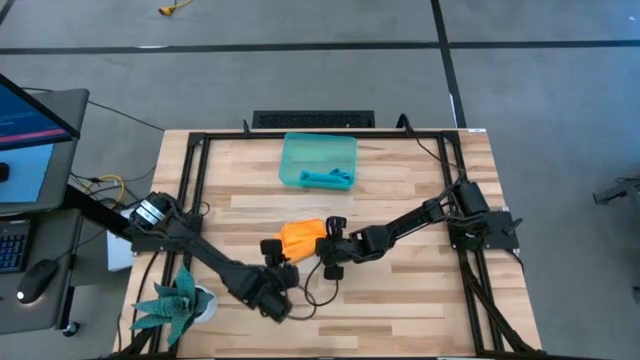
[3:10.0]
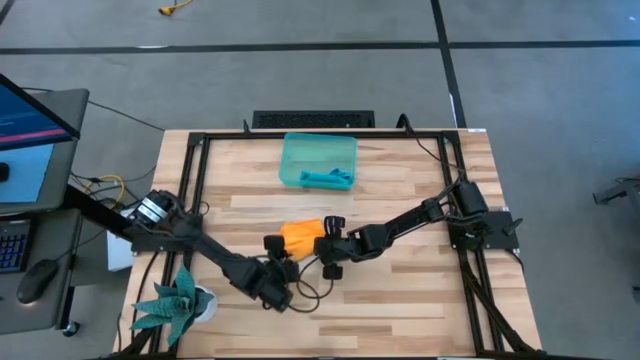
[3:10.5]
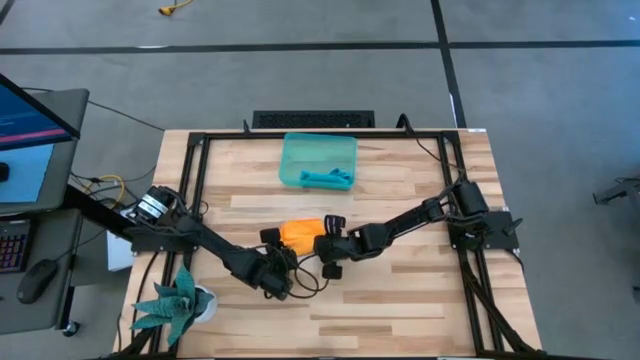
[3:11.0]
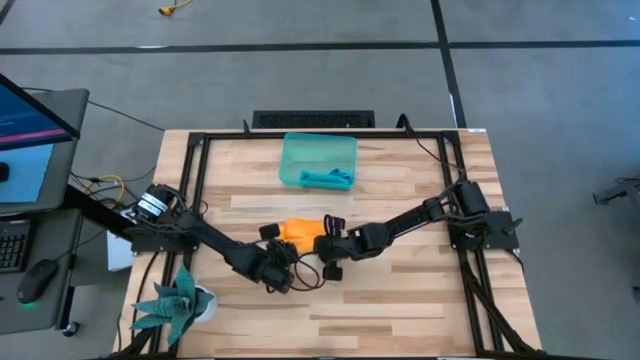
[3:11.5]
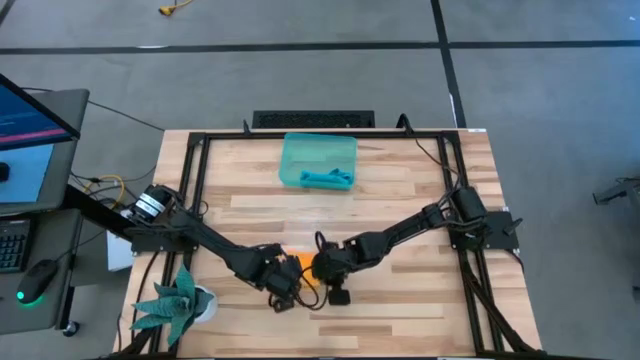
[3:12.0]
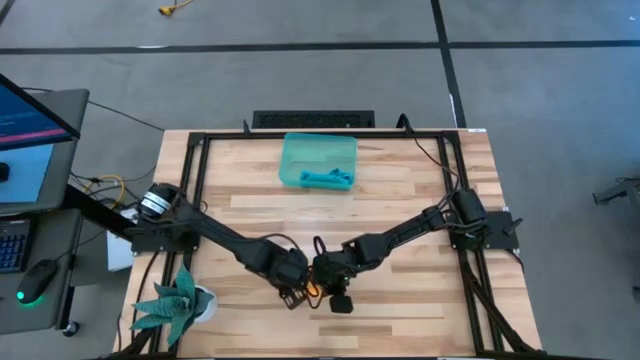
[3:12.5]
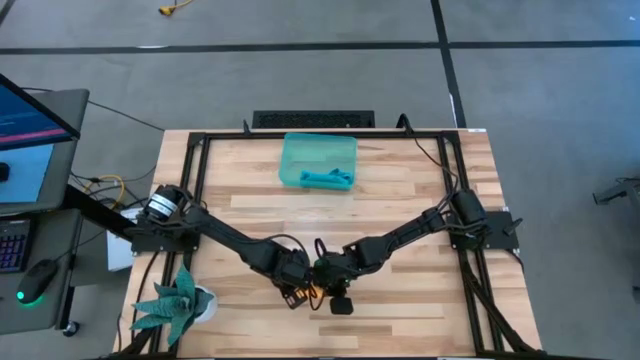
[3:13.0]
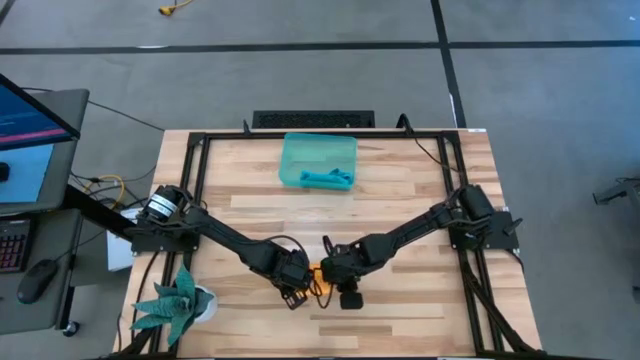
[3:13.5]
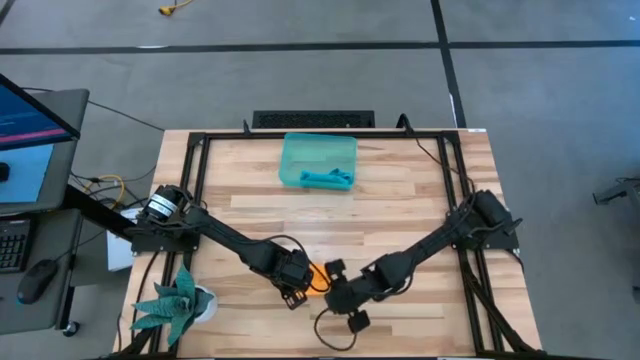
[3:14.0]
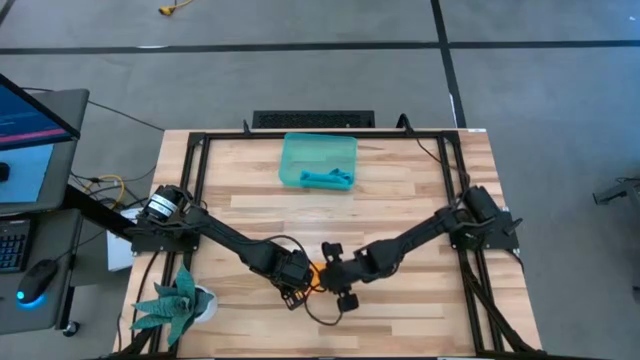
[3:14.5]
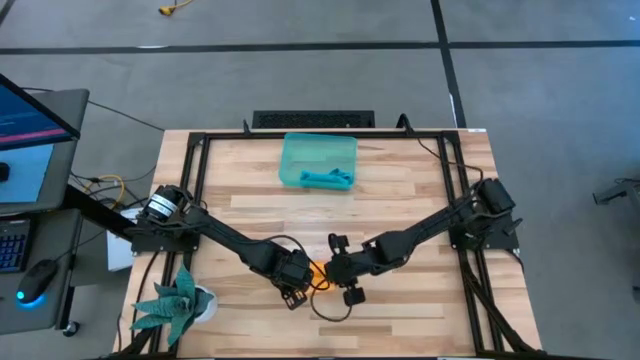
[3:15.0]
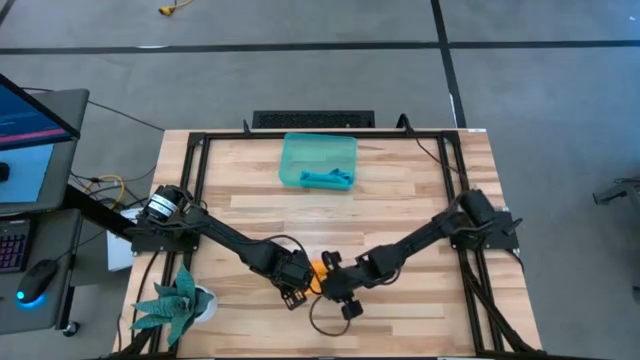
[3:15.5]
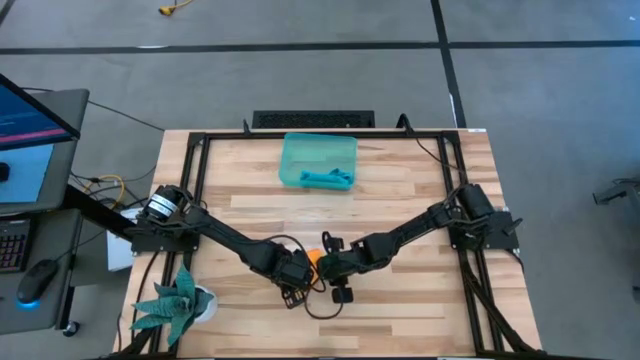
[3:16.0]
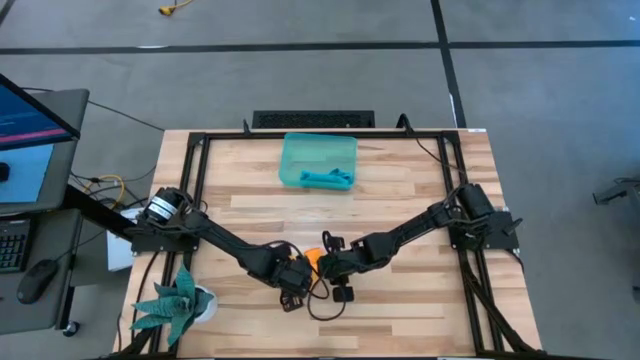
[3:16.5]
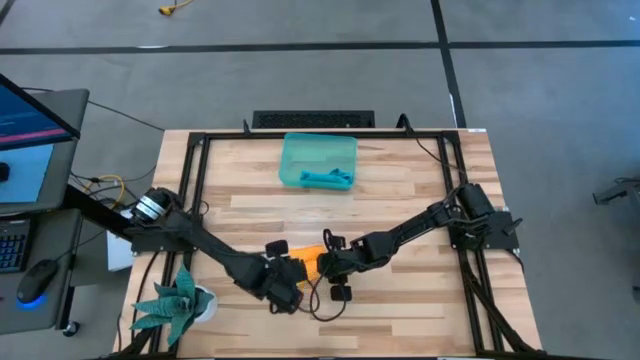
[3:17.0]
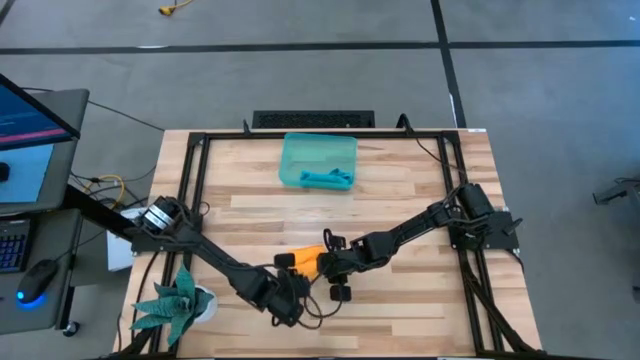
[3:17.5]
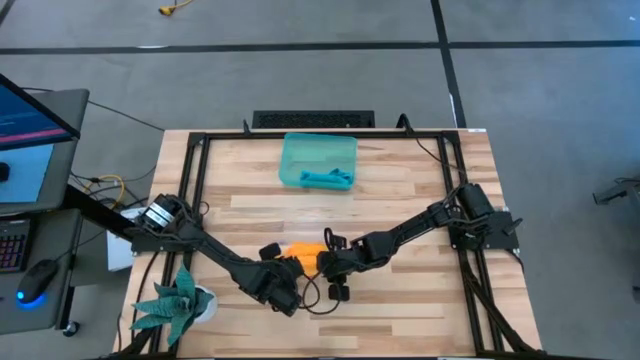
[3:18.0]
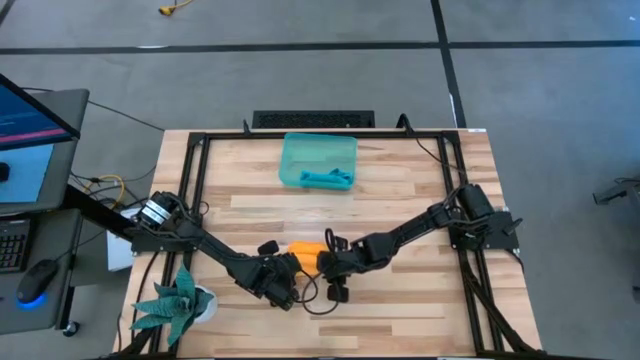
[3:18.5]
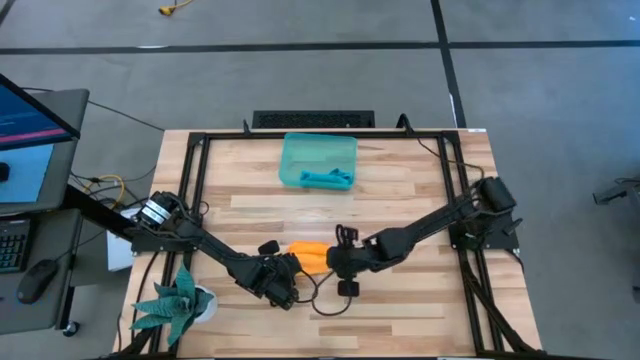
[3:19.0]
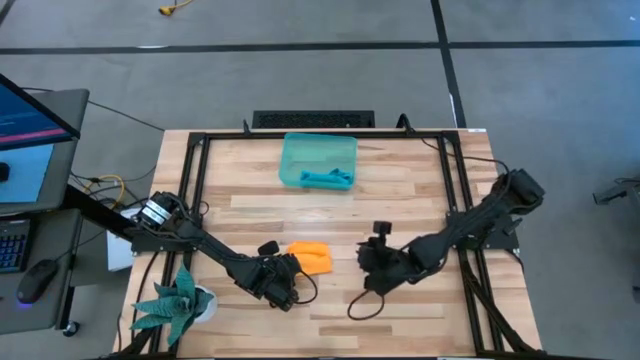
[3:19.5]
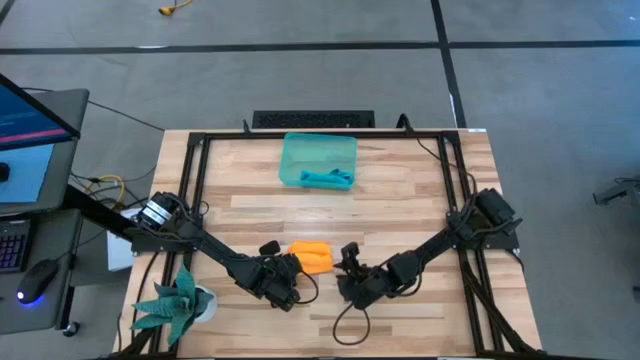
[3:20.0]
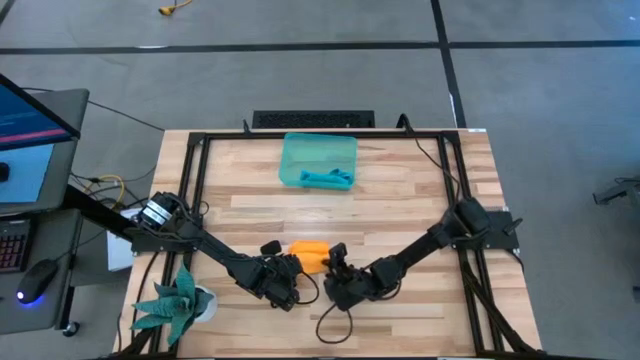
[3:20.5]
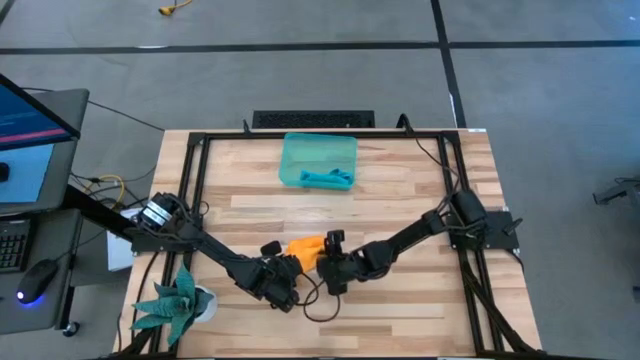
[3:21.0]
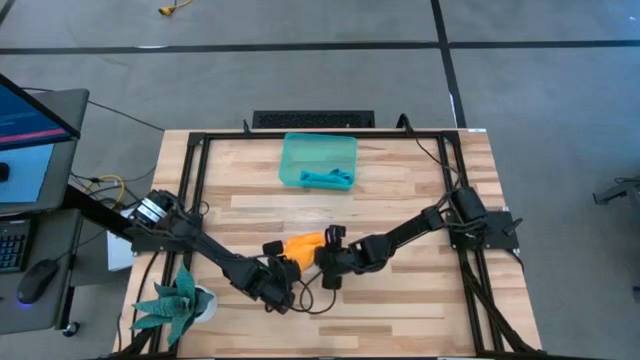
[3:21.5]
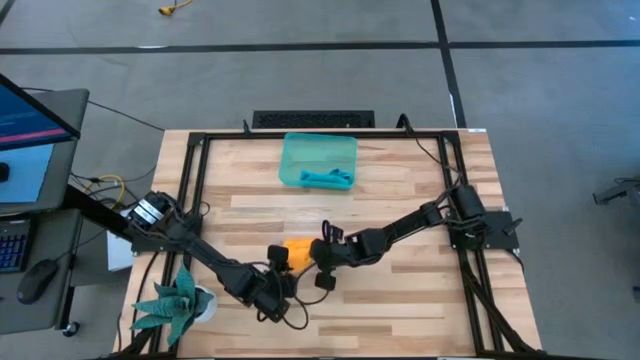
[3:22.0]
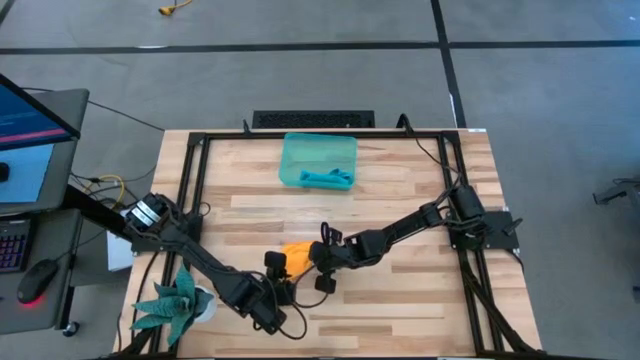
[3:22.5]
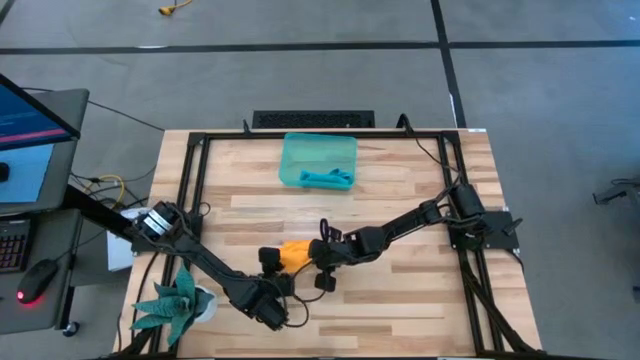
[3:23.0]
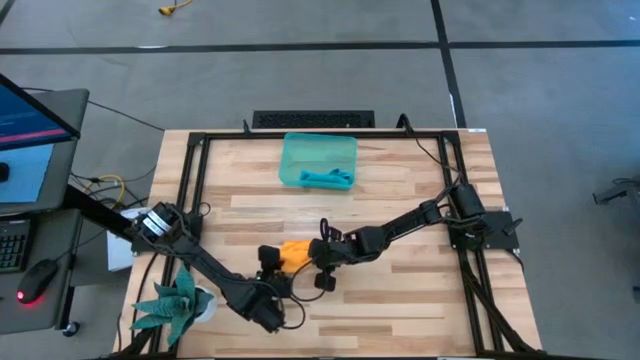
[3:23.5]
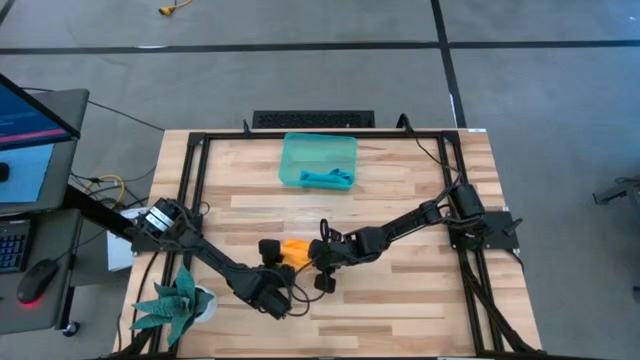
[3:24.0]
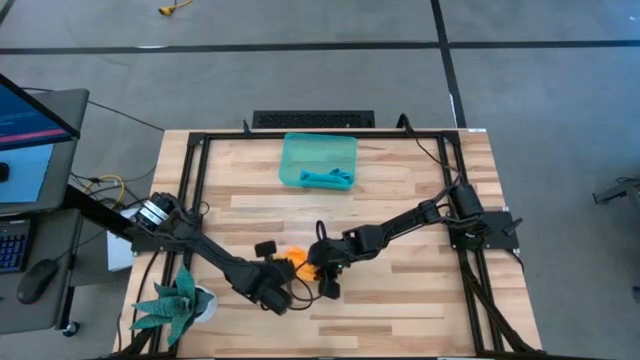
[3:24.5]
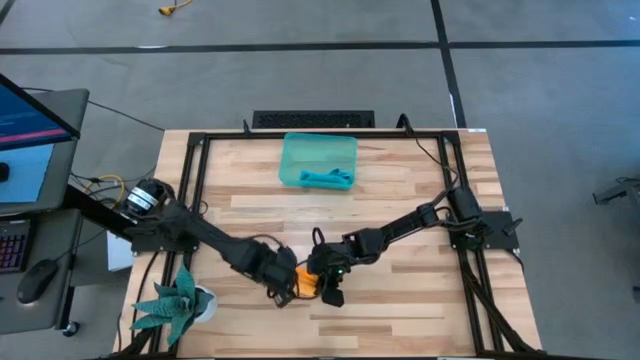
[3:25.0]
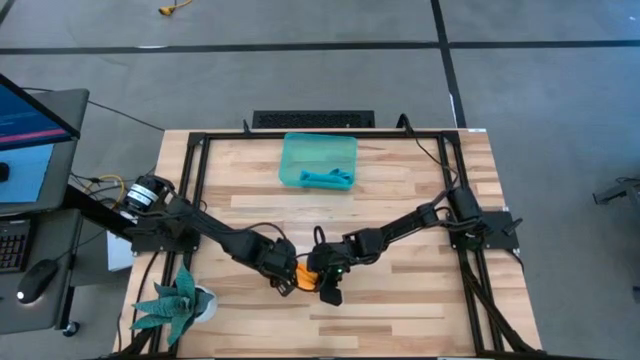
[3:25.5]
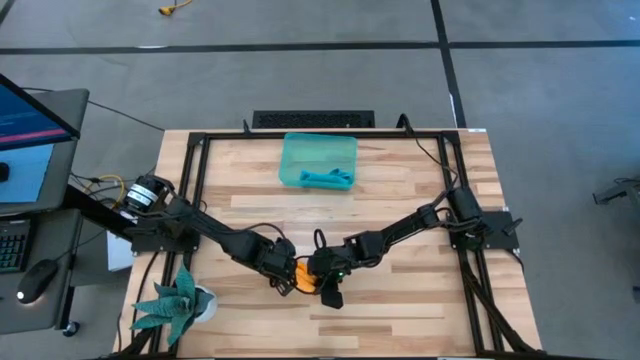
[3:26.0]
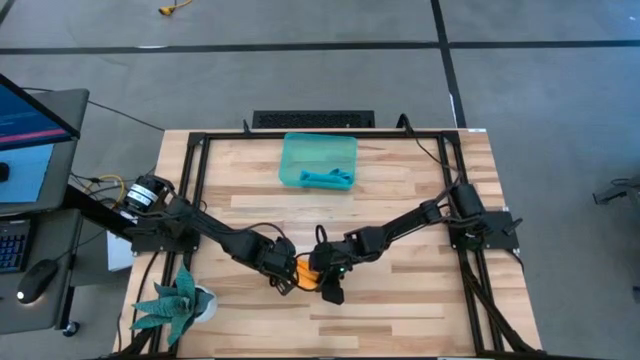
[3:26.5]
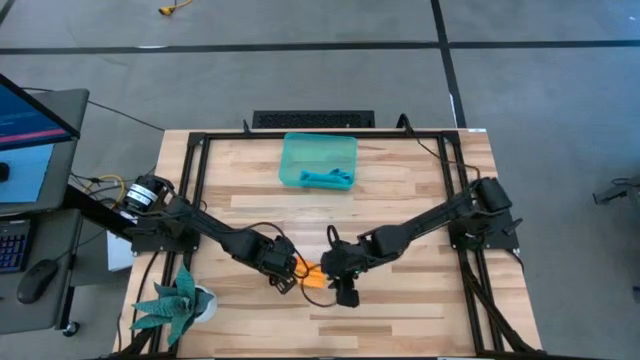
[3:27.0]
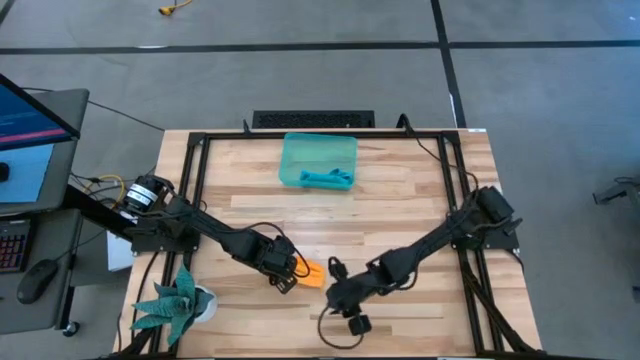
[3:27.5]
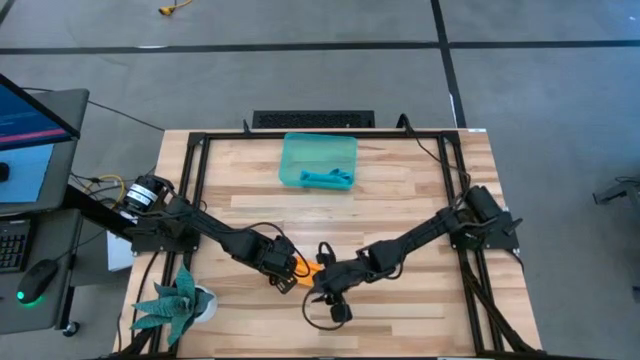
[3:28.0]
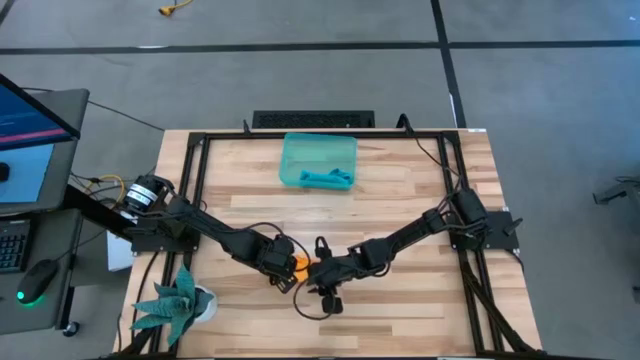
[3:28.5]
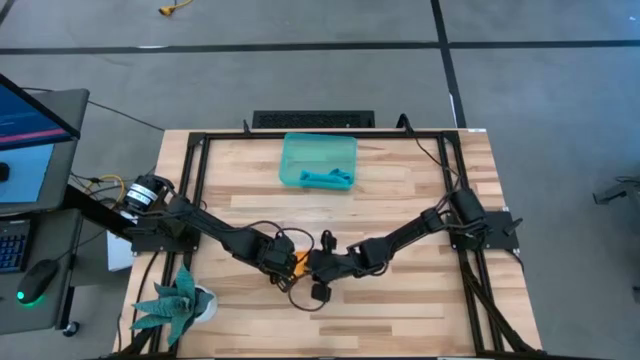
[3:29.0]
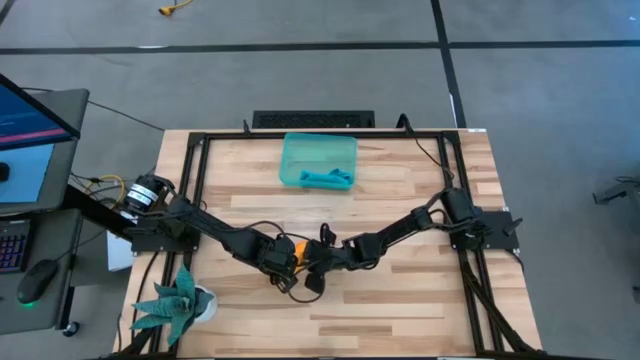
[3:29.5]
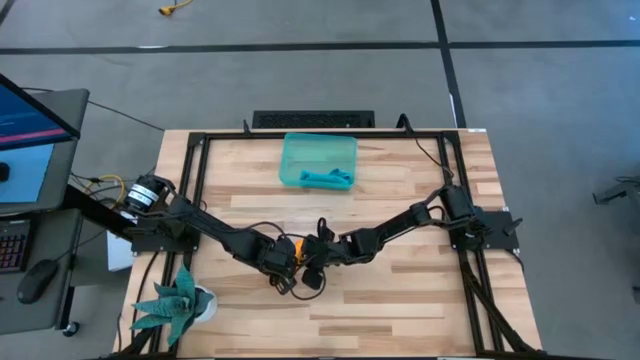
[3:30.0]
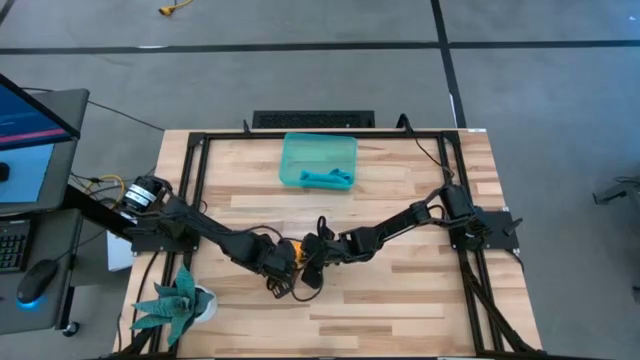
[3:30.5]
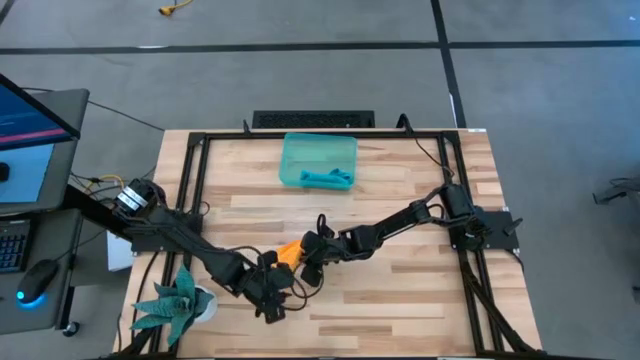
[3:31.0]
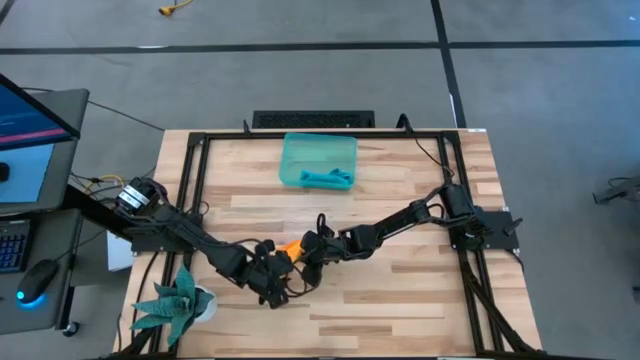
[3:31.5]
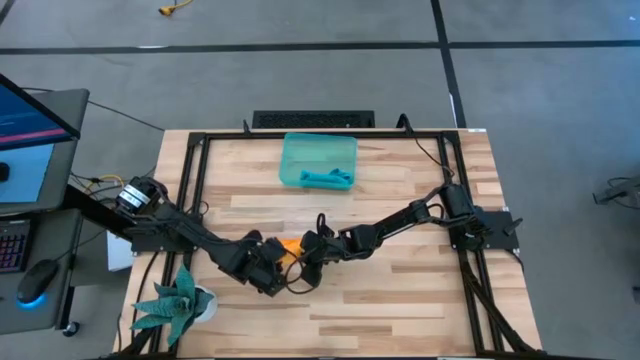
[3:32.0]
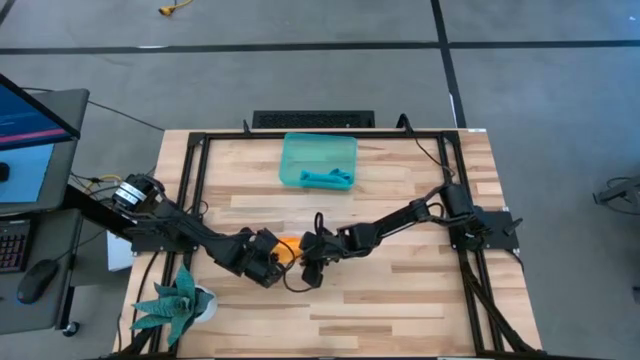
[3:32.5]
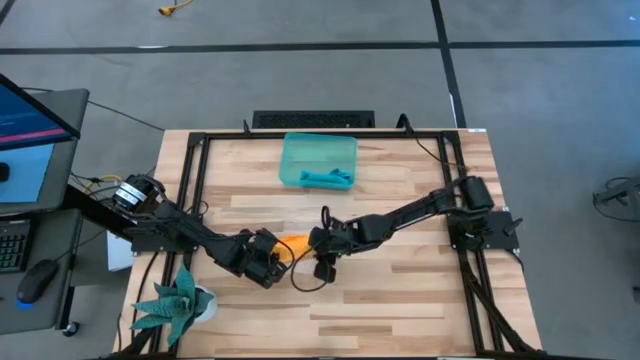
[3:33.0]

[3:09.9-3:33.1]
Task: Roll microfiber towels into tight, uniform cylinder then place into a basket
Roll the yellow microfiber cloth
